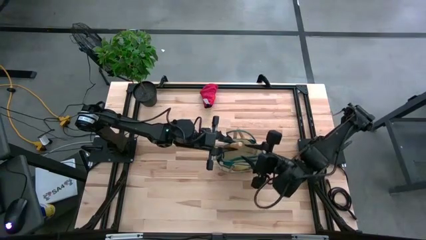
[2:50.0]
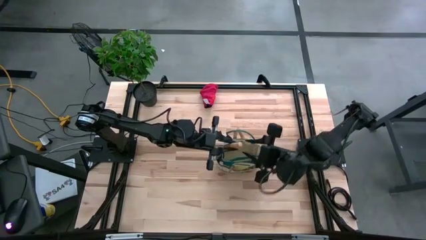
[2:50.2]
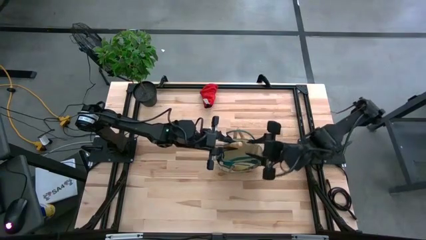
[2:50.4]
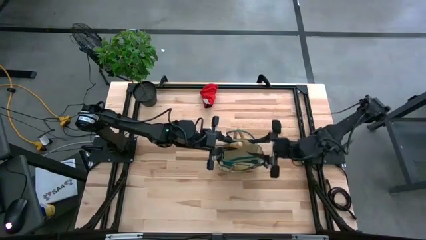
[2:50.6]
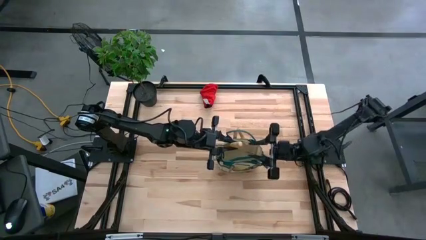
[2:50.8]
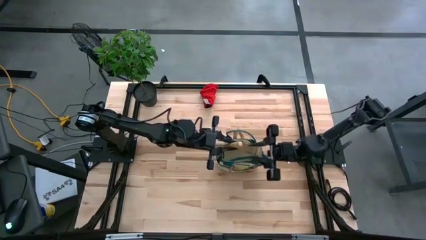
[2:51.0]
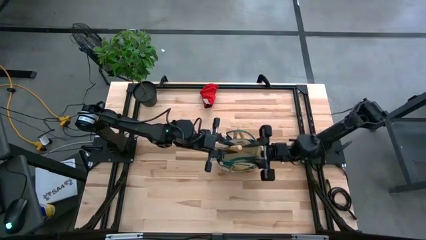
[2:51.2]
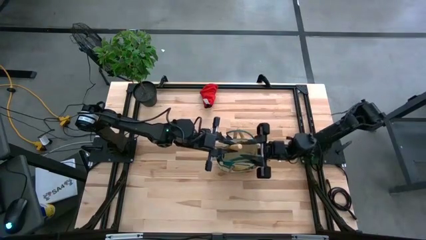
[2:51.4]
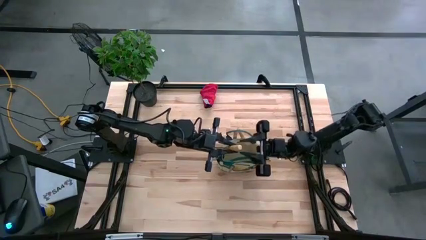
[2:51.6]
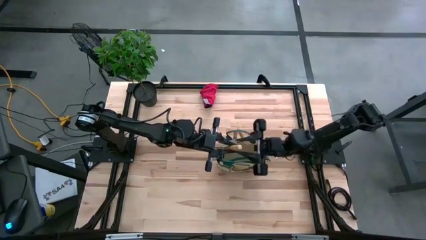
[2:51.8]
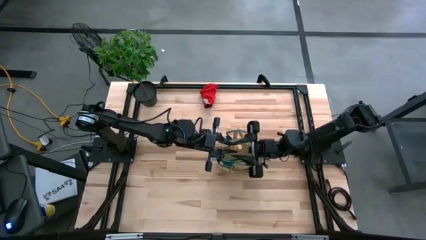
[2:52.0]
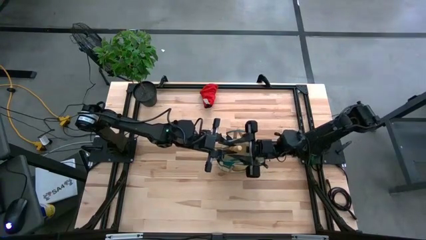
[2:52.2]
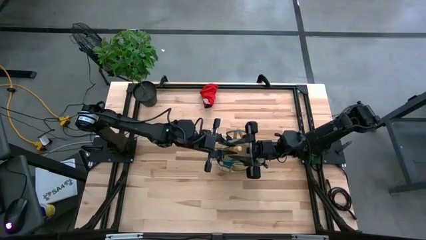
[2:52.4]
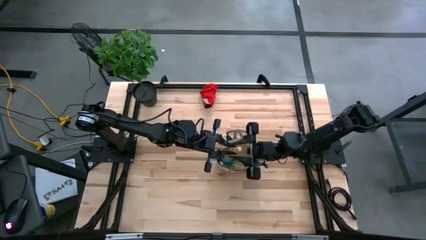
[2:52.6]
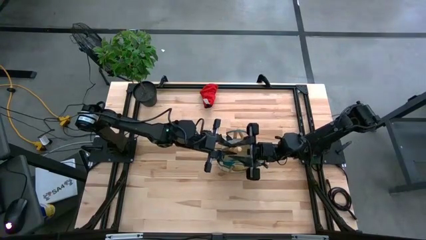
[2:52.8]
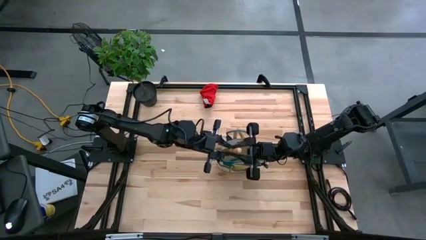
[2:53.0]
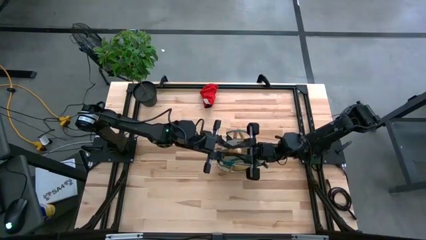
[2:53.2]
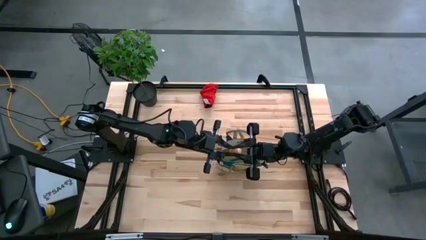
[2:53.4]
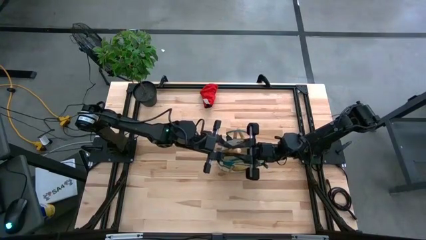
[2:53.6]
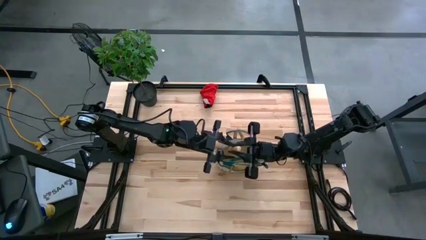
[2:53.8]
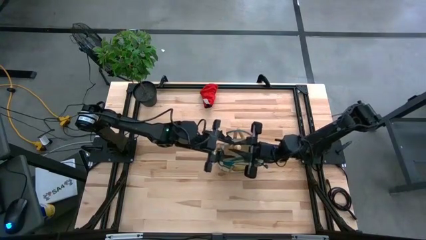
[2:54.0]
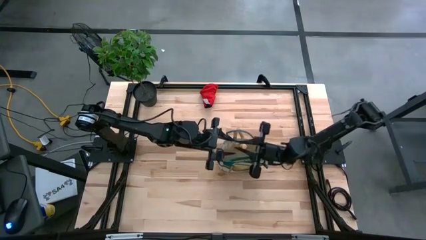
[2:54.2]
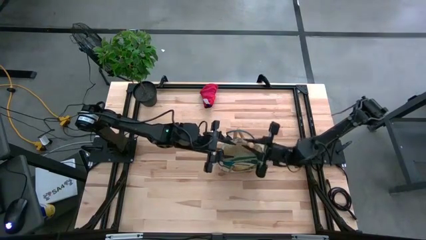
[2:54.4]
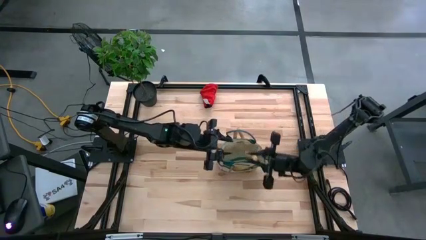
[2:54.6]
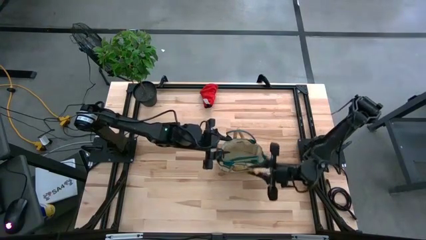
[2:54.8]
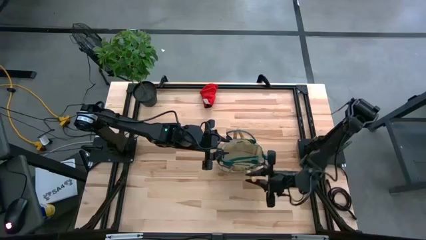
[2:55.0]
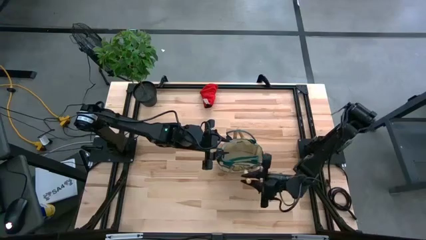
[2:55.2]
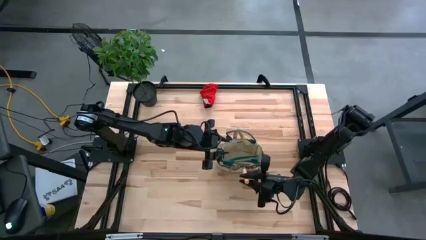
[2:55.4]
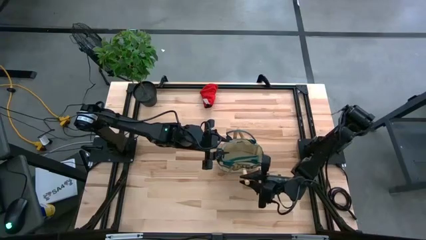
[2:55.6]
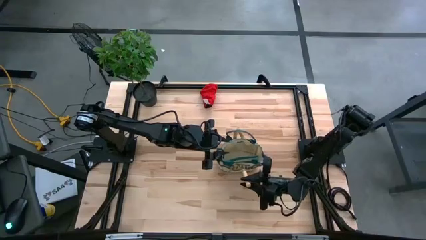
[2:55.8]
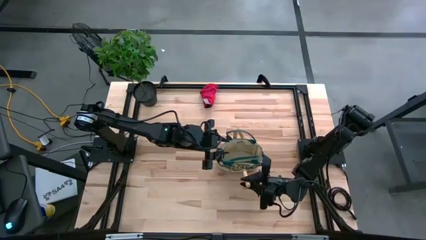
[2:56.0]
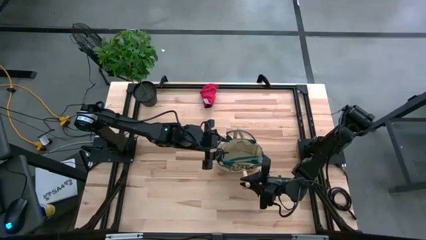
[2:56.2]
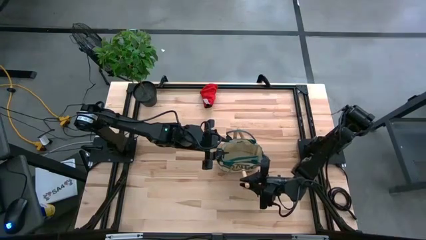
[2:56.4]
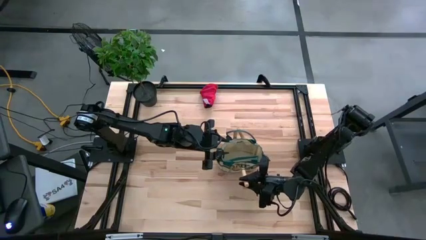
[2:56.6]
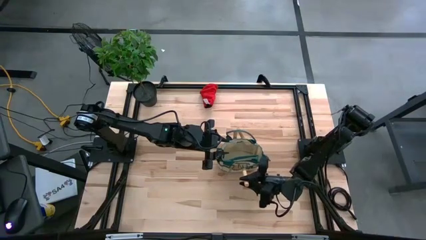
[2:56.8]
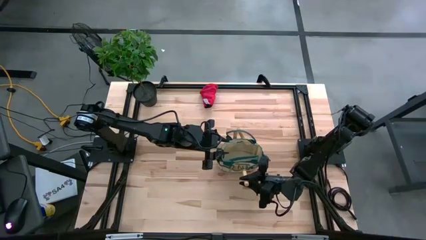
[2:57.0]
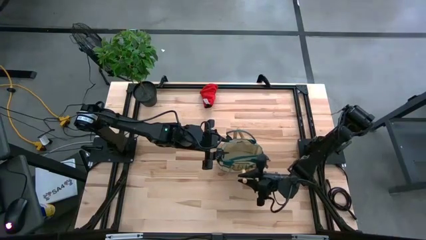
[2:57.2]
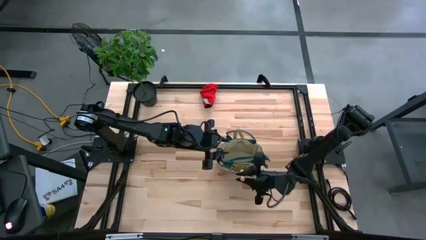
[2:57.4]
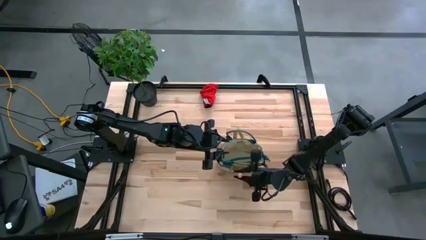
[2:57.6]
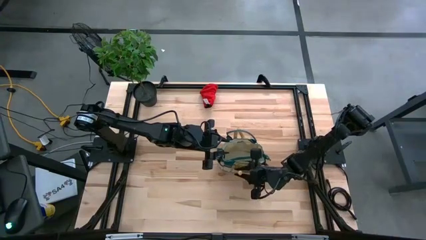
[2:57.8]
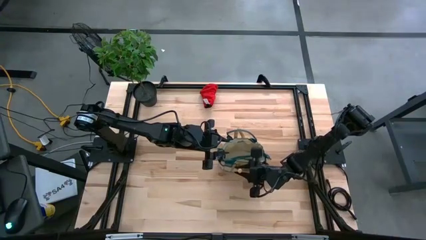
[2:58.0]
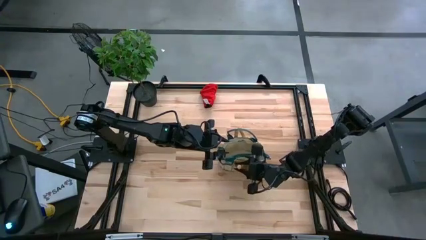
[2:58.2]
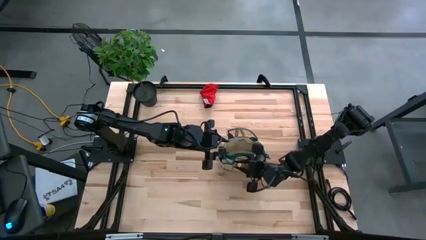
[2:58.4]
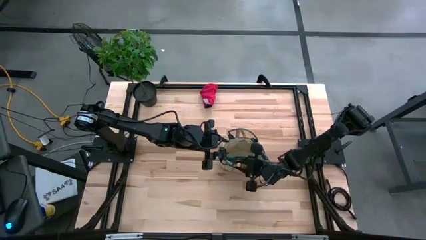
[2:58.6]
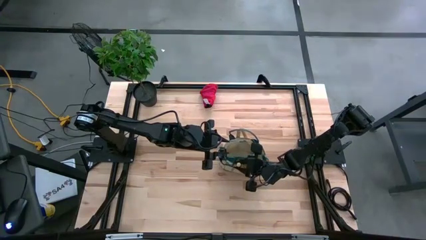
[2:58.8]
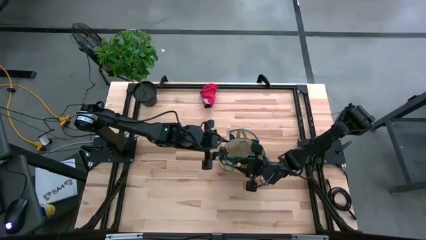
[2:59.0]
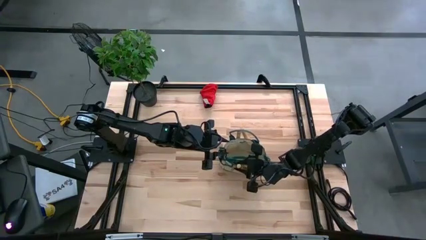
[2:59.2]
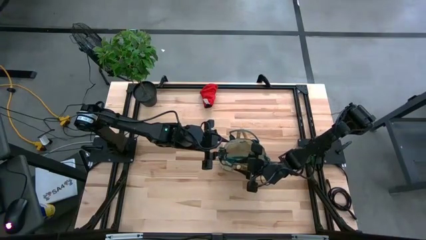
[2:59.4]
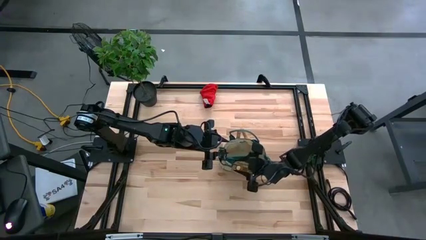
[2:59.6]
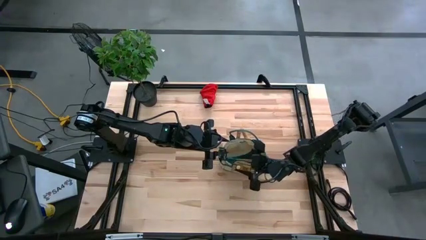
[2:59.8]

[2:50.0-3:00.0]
Task: Pick & Place Garden tools in Gardening bag
Put the hand rake into the gardening bag

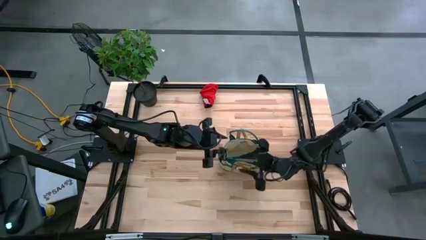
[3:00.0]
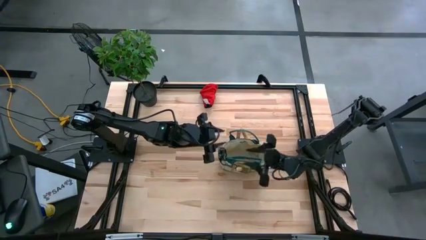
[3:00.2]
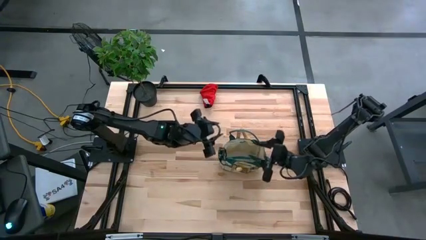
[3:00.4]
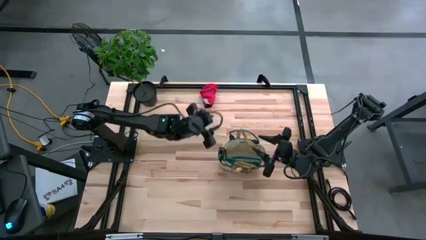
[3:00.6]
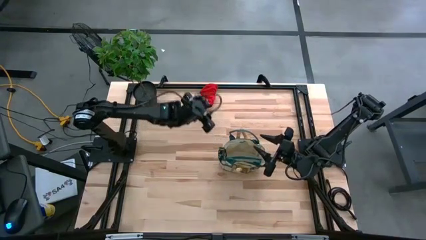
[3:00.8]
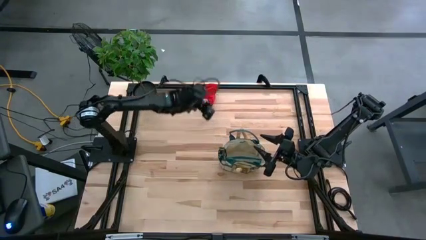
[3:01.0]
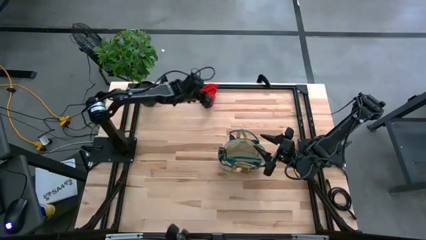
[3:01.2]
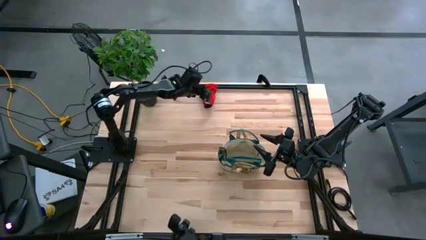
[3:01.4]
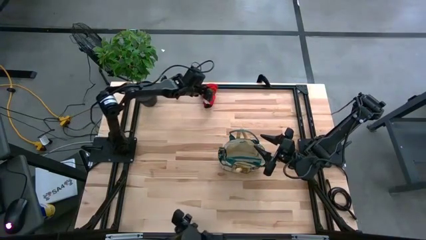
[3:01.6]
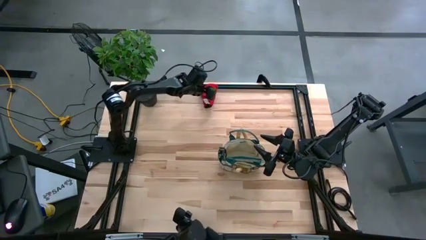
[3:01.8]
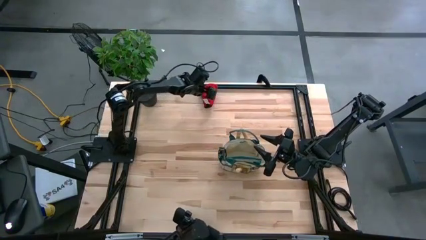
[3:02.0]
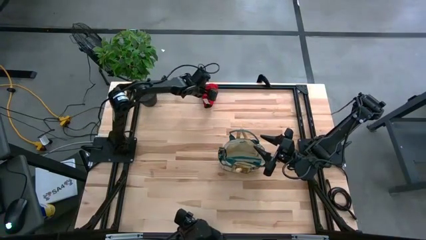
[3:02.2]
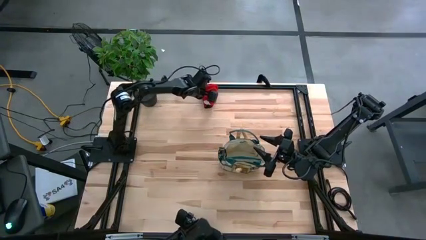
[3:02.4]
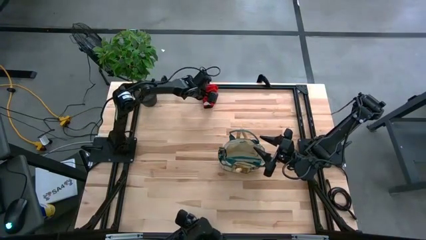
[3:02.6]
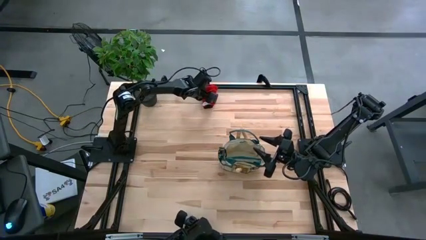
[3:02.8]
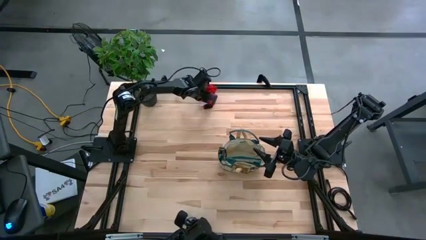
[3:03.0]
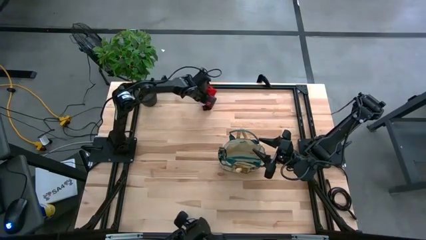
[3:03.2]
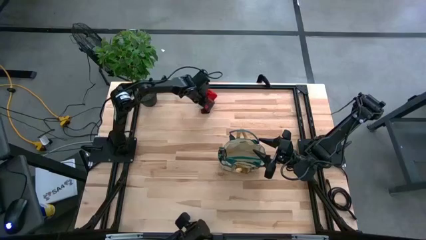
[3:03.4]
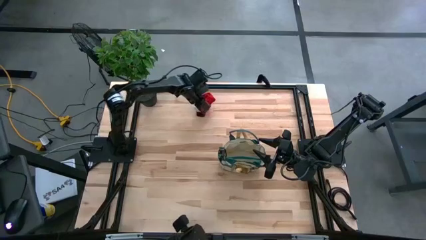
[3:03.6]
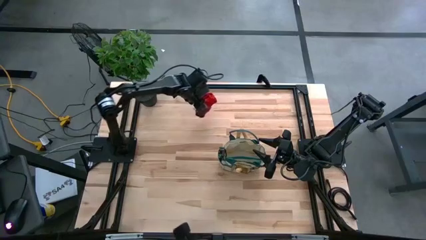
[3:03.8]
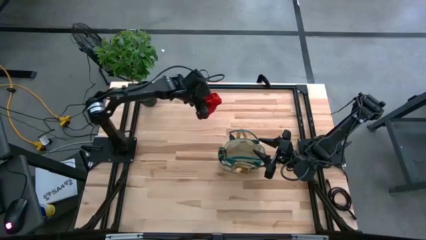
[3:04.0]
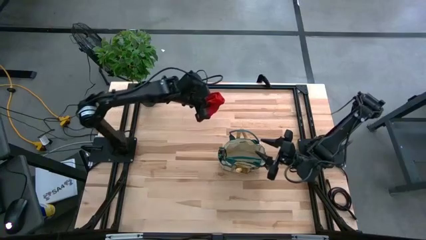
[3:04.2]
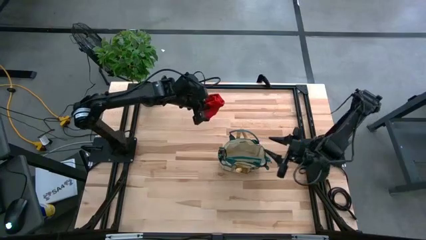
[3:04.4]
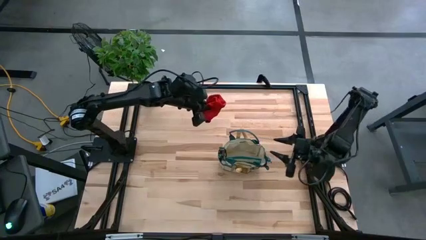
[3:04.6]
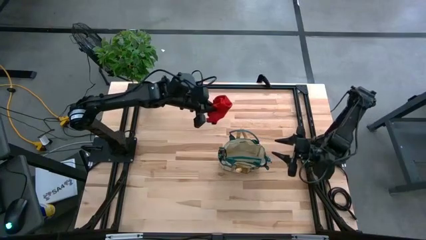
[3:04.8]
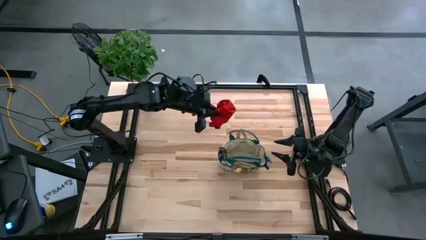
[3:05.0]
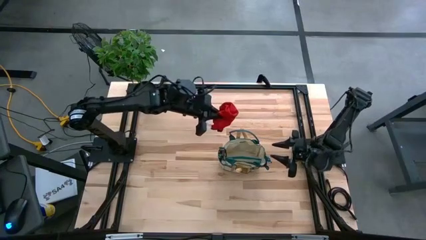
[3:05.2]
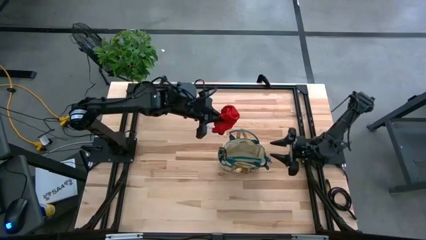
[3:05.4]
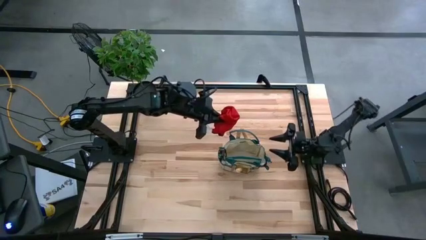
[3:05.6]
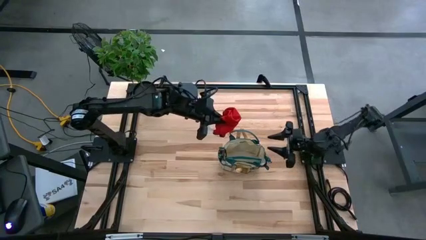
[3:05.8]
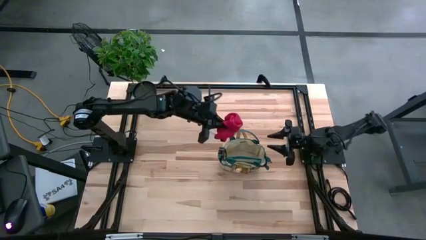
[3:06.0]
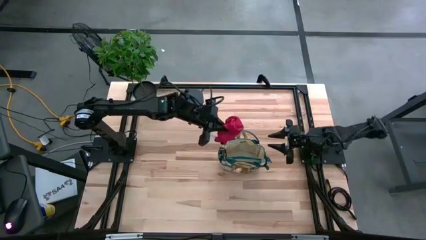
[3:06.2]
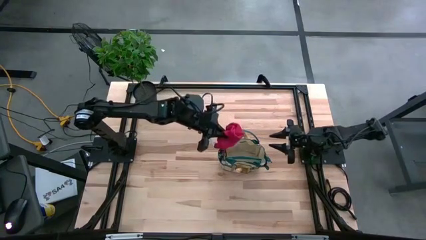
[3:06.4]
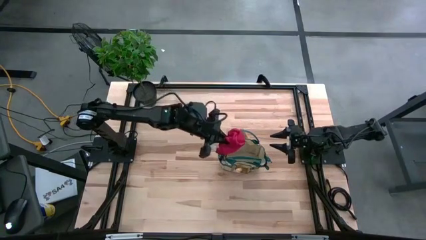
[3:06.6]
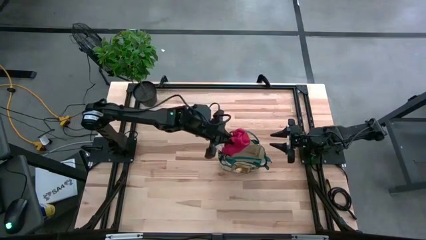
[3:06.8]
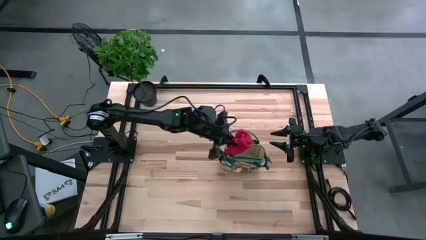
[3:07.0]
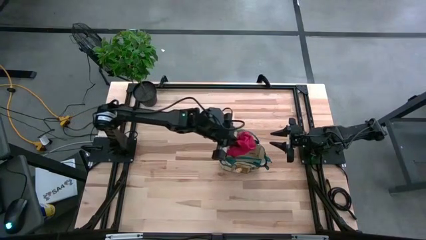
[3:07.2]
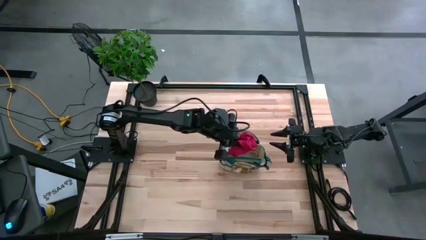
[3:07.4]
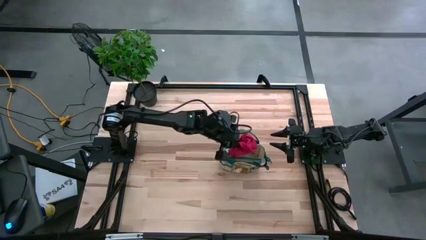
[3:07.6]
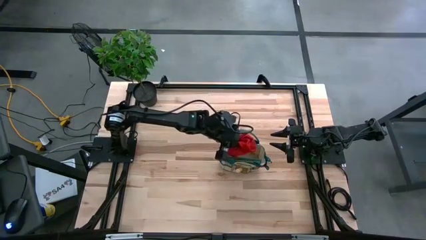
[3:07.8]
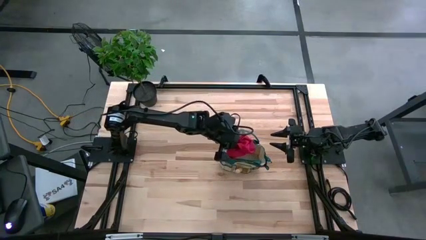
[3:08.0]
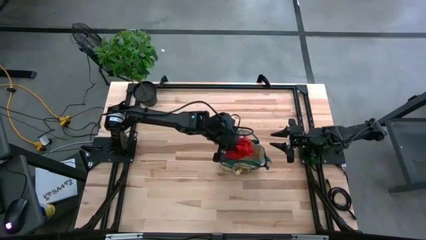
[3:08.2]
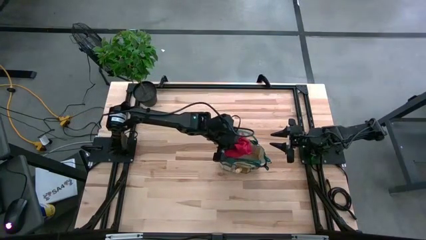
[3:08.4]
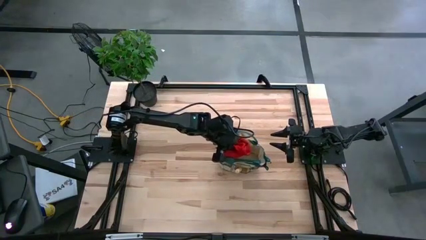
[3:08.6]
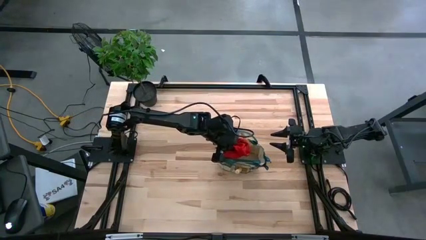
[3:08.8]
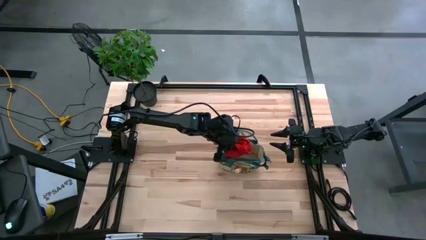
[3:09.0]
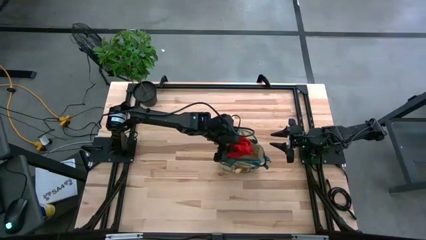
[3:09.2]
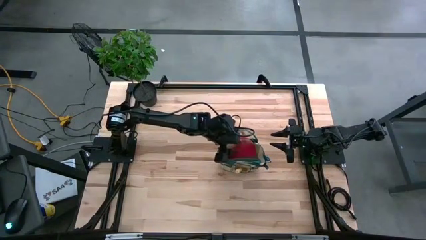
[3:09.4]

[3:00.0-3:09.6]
Put the red gloves into the gardening bag
